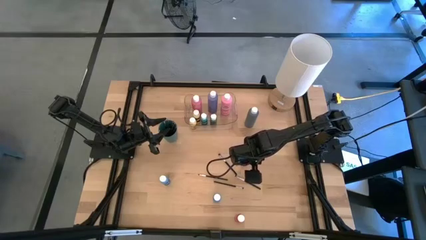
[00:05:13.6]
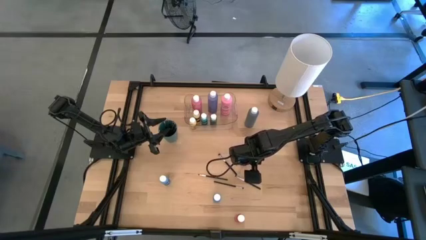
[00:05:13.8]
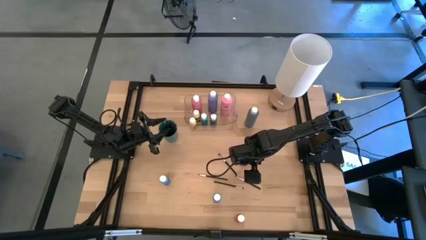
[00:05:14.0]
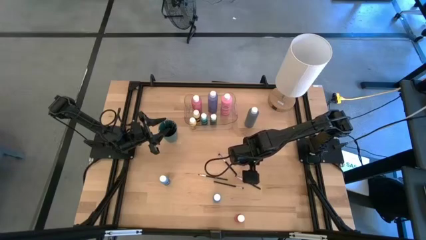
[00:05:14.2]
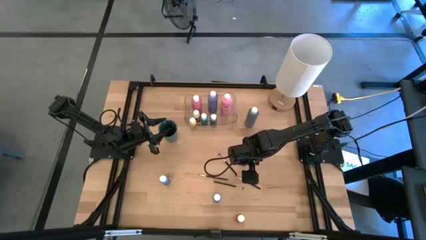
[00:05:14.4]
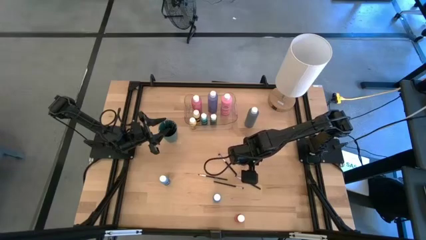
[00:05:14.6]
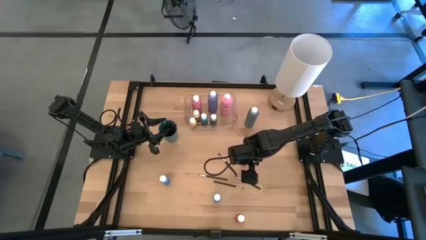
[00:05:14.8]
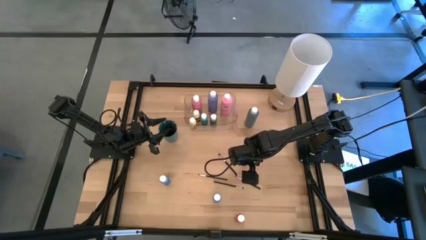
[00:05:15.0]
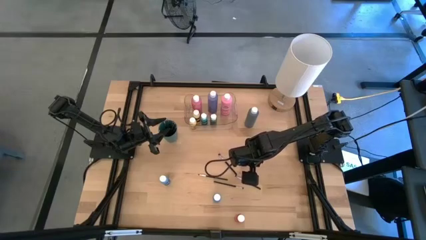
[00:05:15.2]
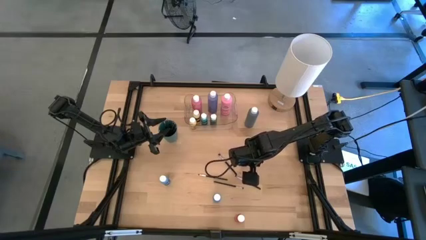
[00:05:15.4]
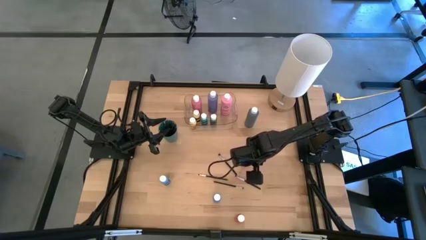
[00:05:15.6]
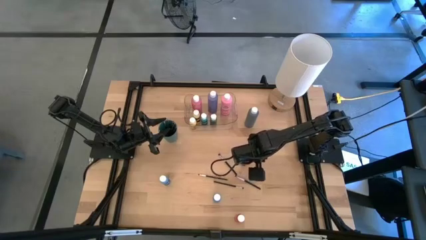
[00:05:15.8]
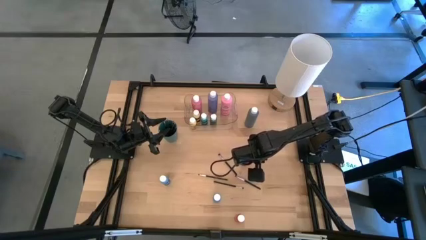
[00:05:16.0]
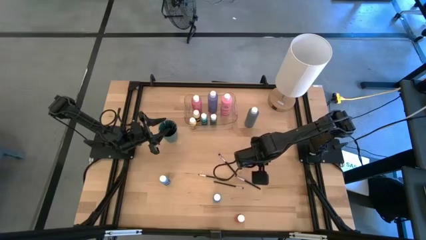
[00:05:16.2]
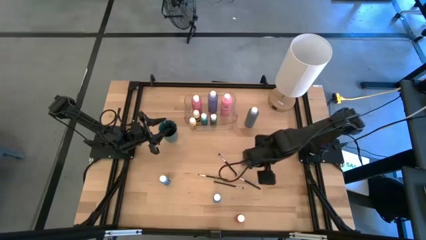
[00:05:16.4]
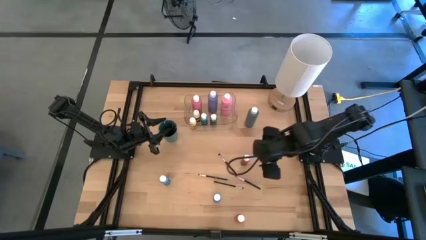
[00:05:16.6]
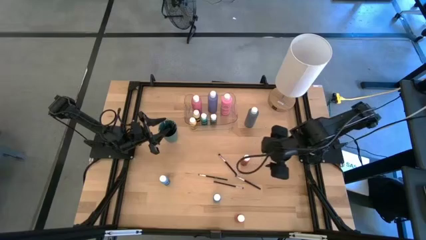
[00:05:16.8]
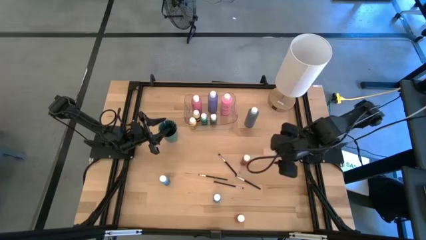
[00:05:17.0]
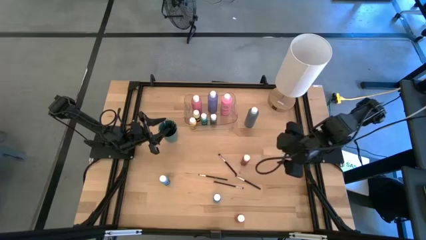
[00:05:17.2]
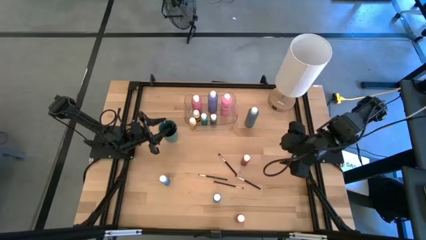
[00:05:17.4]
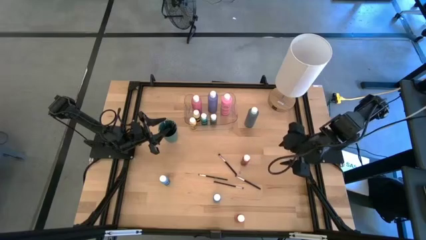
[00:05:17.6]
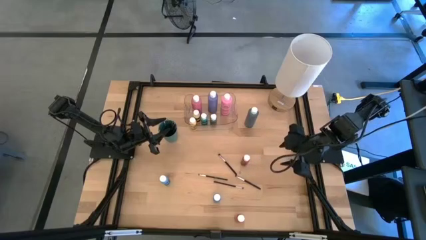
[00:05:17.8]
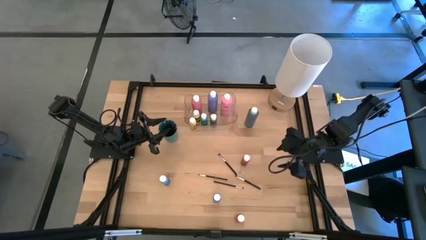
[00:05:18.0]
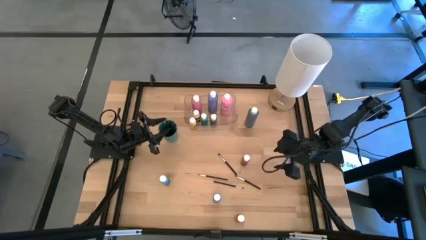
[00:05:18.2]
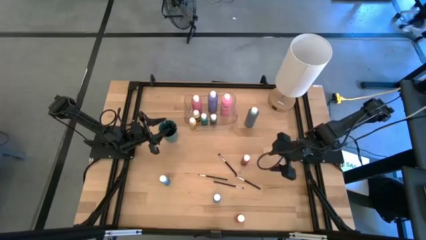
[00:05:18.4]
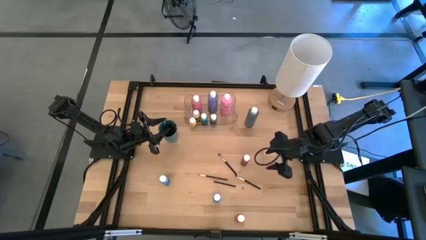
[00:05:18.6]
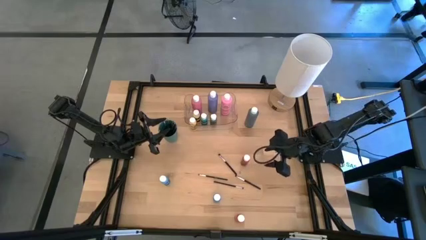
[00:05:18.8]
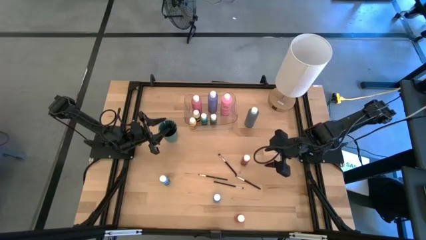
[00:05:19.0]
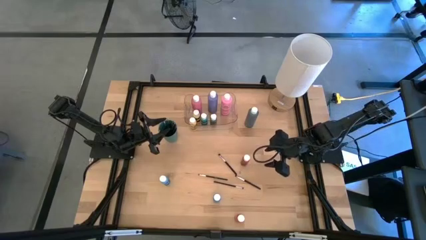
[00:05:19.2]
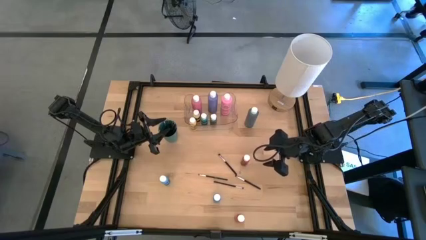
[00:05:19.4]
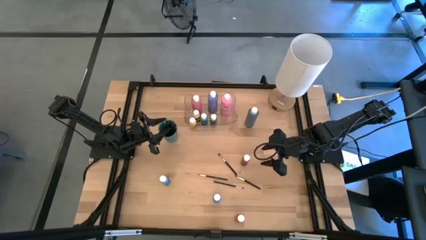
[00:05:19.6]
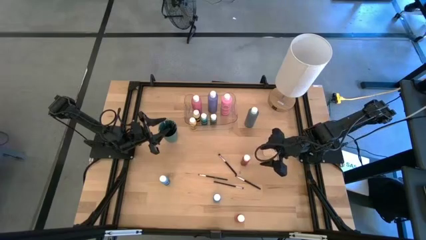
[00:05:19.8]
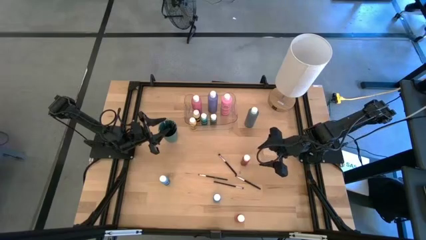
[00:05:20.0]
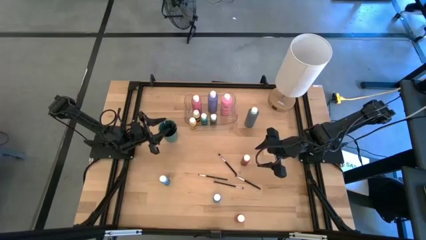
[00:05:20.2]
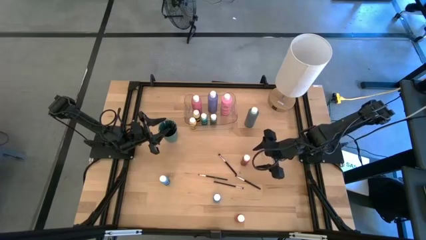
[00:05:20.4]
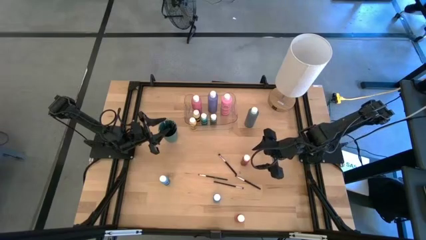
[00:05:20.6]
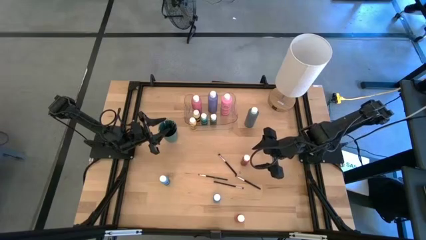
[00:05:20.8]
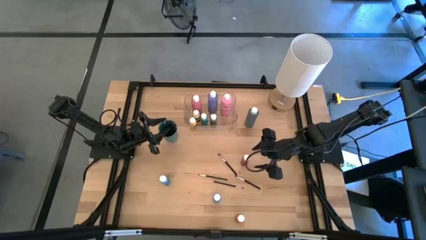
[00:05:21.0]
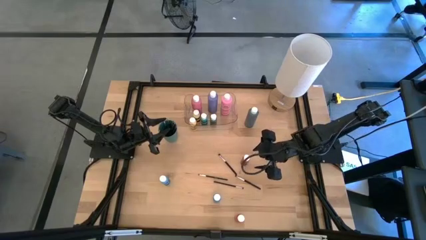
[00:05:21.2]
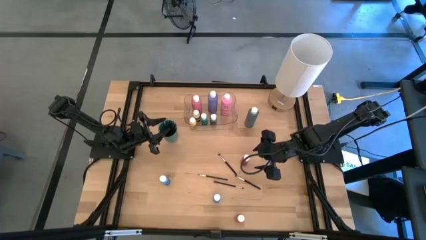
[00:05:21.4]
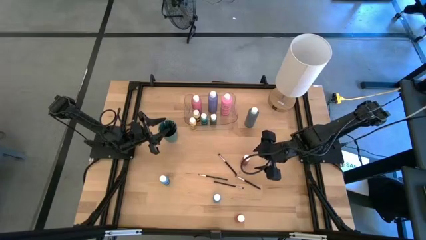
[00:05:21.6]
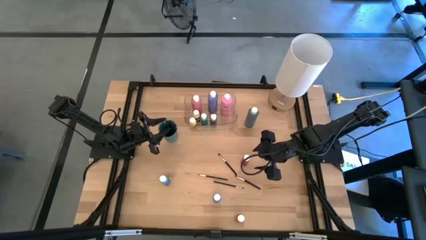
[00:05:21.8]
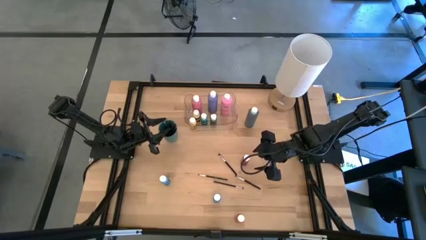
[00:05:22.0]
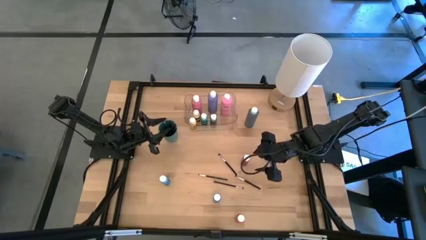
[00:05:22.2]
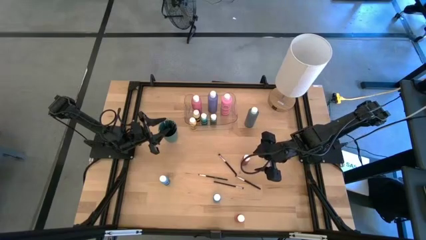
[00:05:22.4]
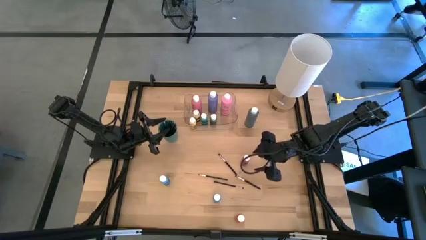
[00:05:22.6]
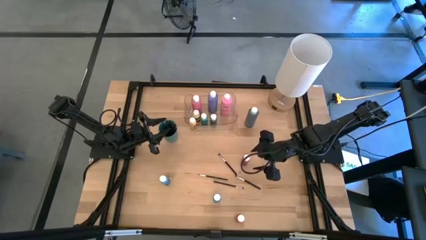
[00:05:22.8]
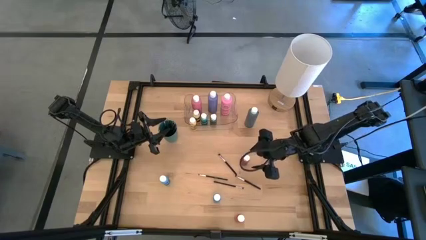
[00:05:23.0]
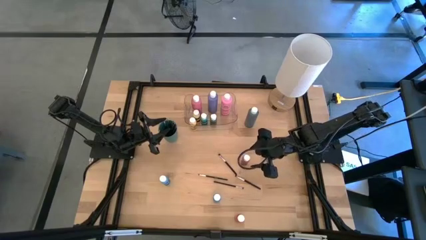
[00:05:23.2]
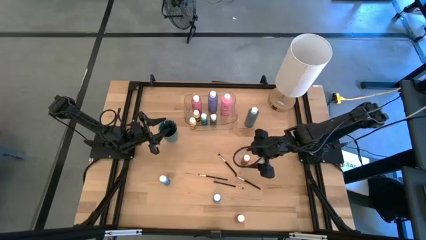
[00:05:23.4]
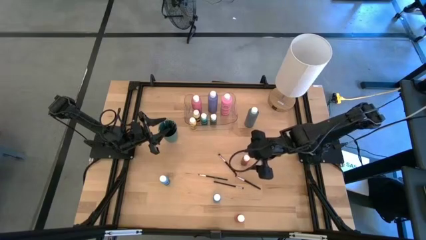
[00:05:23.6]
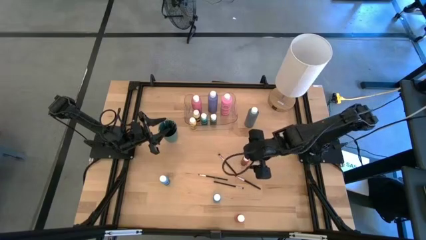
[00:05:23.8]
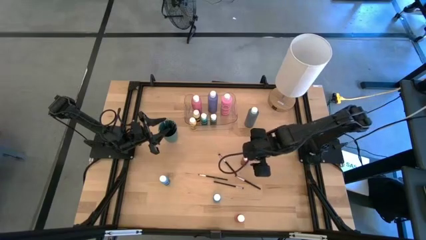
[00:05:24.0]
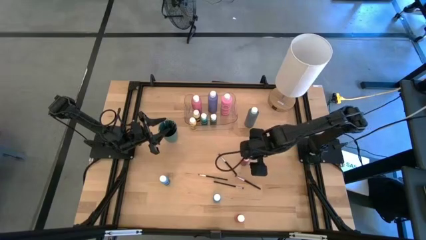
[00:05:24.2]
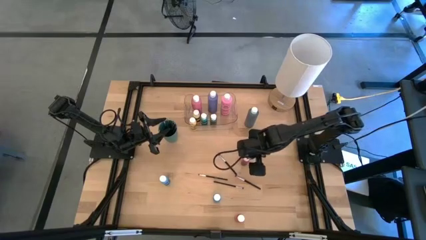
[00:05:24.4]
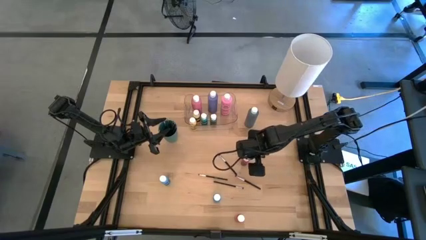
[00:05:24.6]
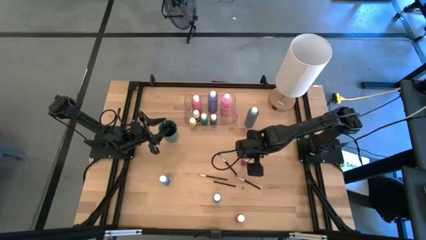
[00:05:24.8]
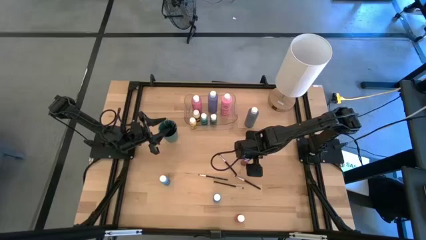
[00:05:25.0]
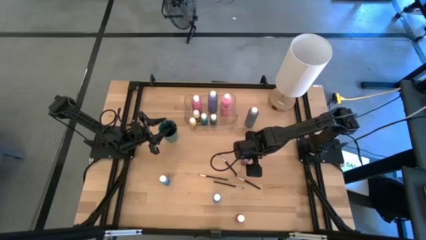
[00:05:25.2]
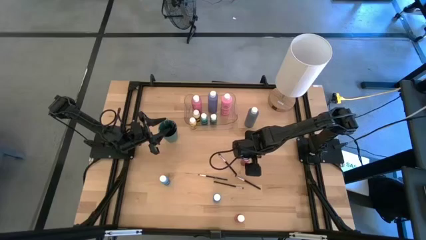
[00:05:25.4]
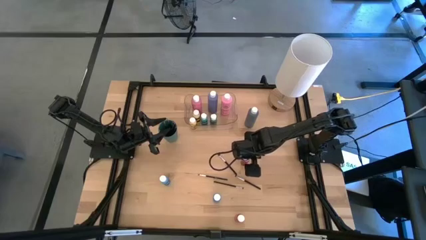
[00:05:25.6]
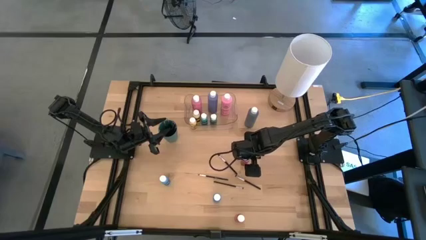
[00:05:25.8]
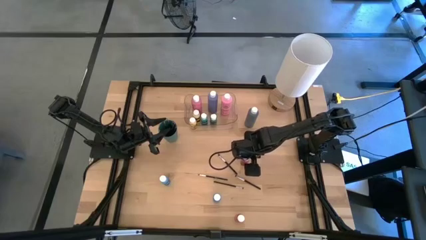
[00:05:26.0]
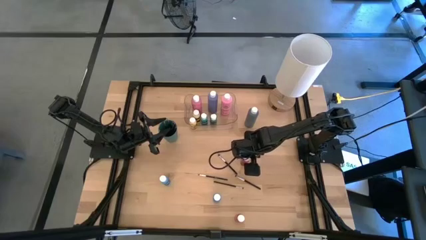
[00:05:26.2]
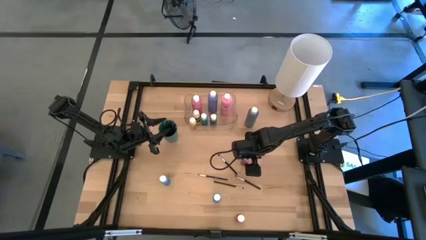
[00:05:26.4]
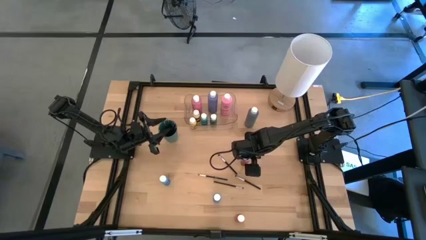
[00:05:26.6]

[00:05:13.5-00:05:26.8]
Task: Pick & Place Paint Supplies
Put the red paint bottle into the transparent bin

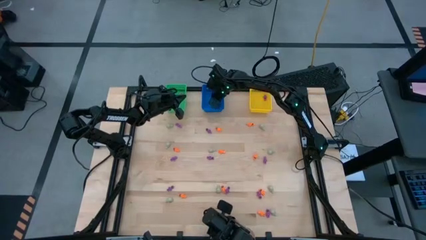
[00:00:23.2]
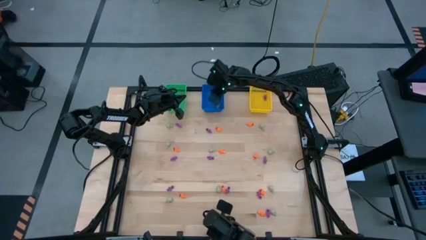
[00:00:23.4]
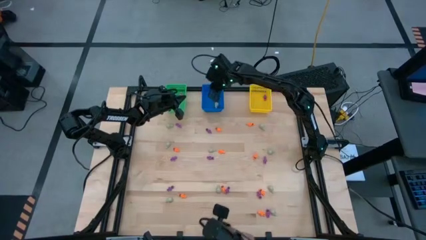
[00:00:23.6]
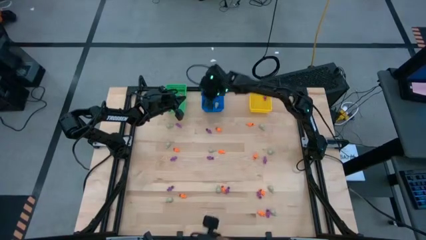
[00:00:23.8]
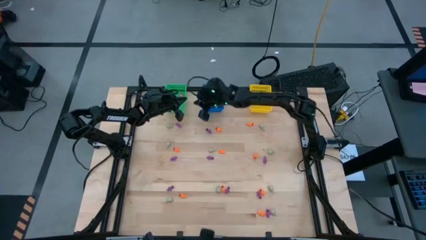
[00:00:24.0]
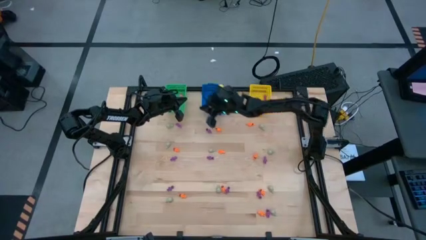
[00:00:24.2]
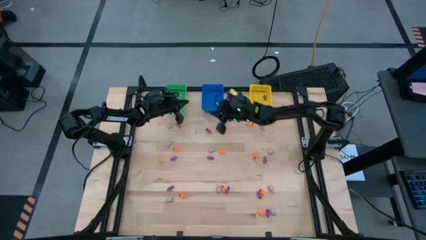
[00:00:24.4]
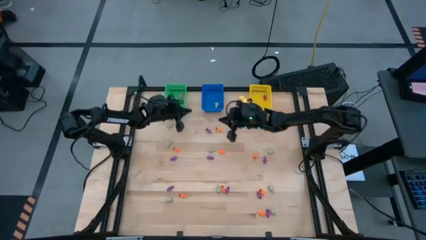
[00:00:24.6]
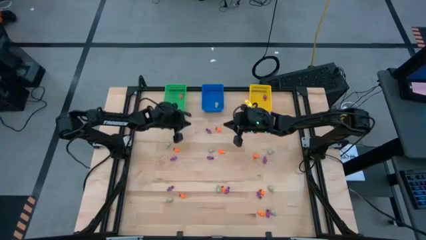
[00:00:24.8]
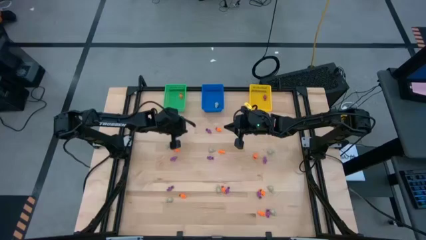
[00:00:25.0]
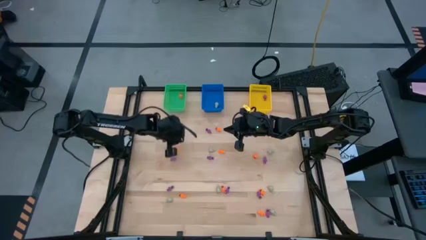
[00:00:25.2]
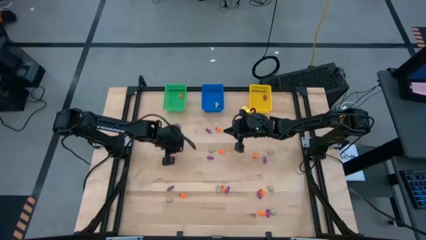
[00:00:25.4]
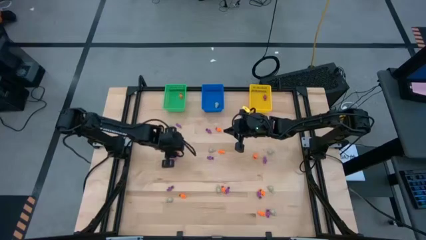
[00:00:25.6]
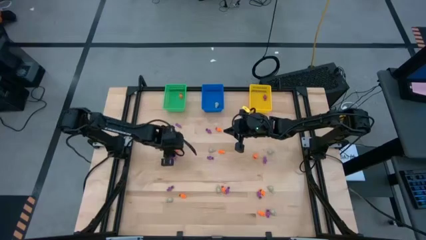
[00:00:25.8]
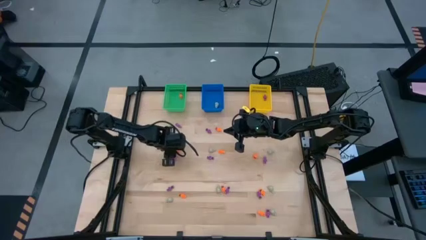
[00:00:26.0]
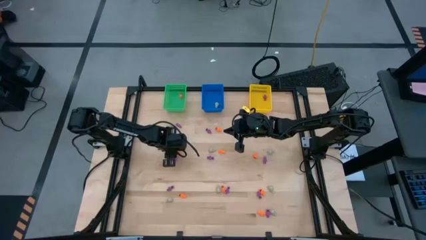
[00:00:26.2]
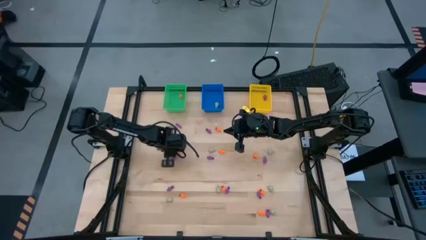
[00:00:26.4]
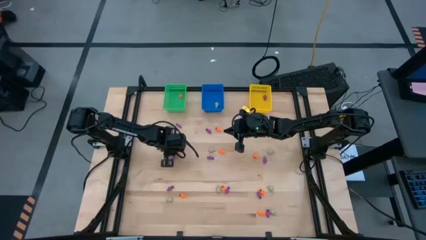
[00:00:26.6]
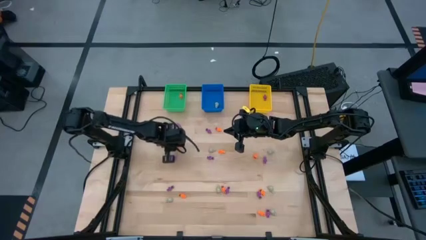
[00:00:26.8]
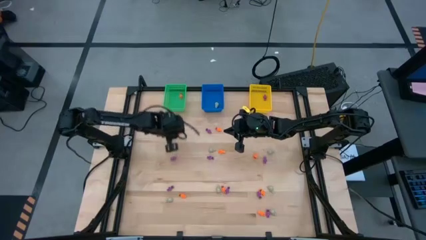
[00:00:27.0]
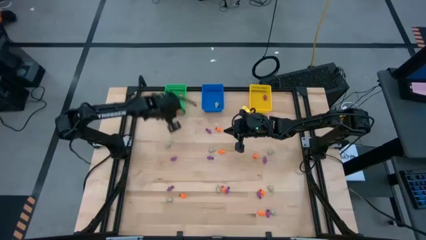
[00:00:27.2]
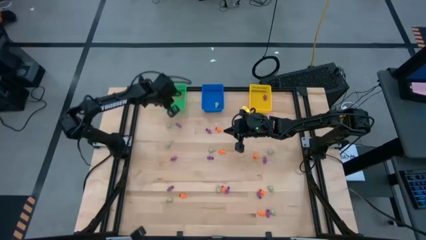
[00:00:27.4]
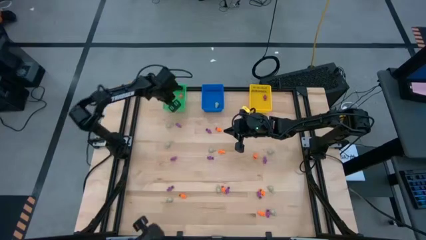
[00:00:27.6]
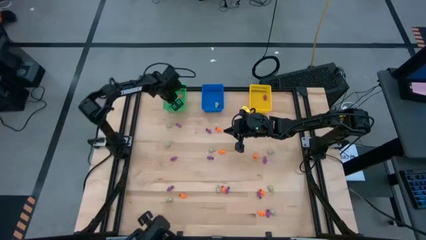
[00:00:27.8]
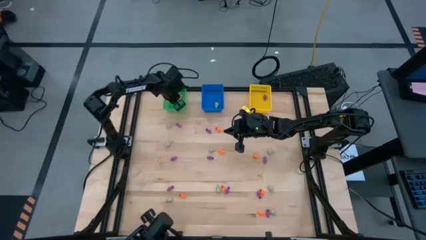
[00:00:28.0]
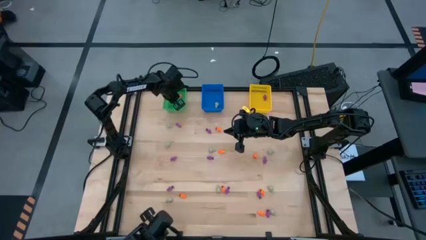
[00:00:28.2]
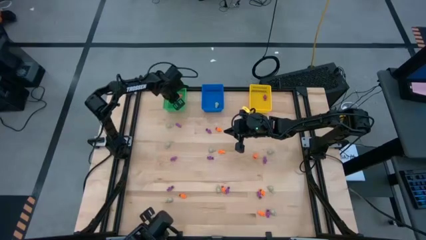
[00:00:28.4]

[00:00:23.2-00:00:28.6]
Task: Sort Halloween decoration
Put the orange skeleton toy into the green bin
